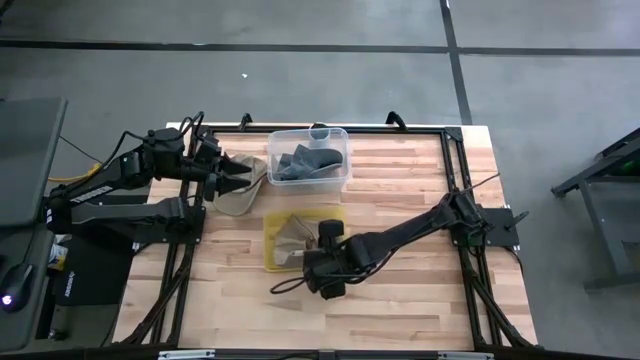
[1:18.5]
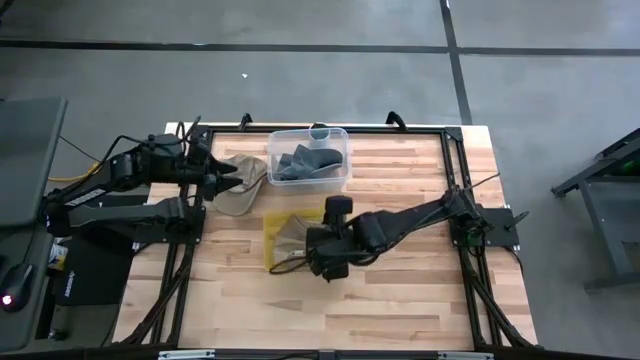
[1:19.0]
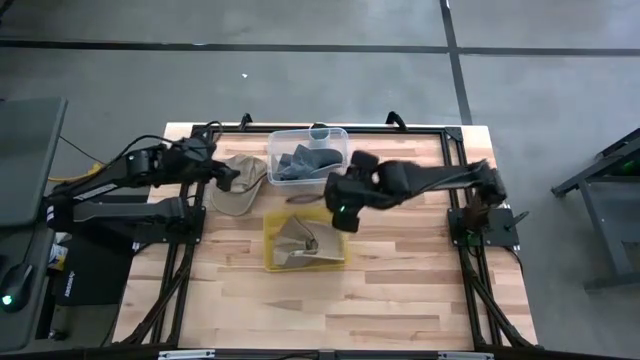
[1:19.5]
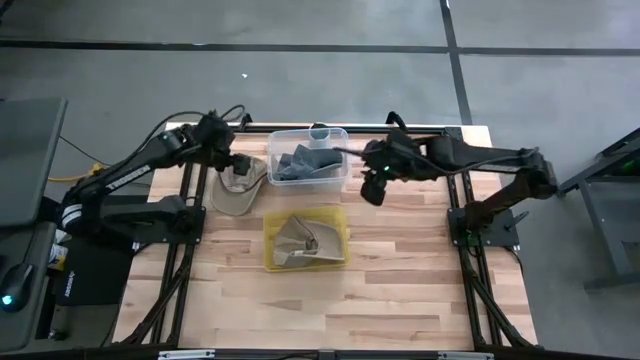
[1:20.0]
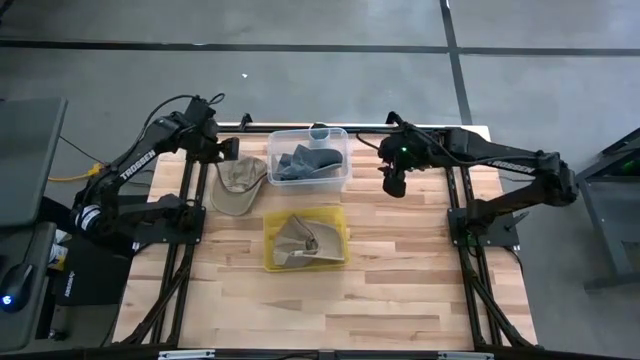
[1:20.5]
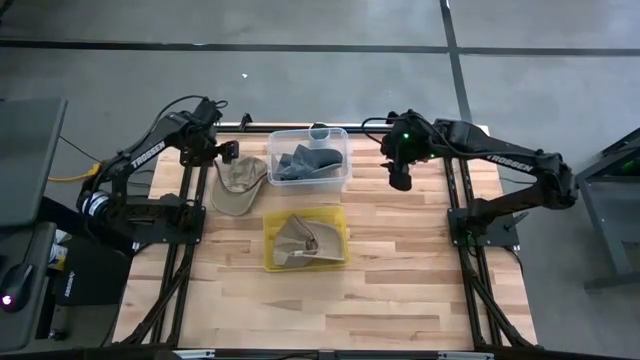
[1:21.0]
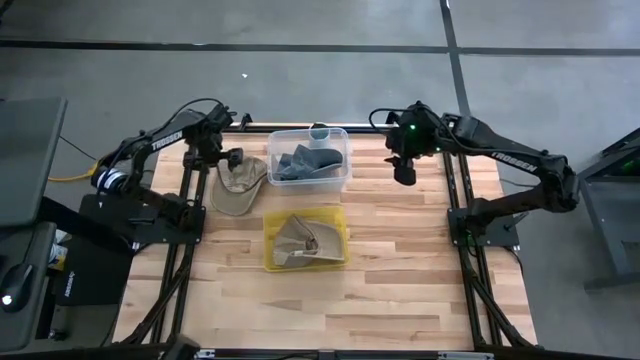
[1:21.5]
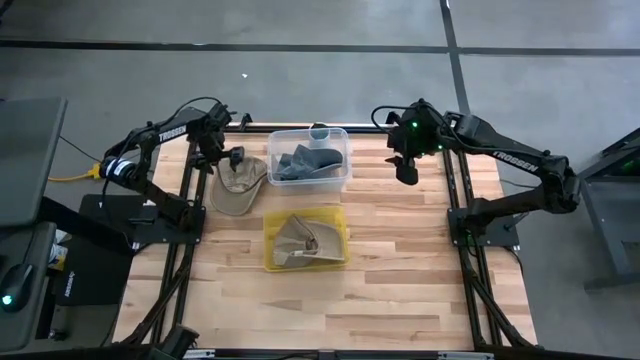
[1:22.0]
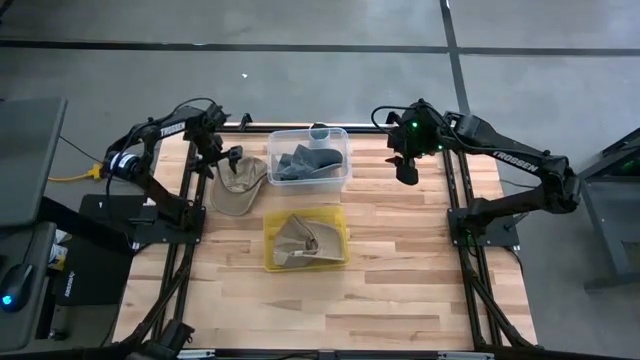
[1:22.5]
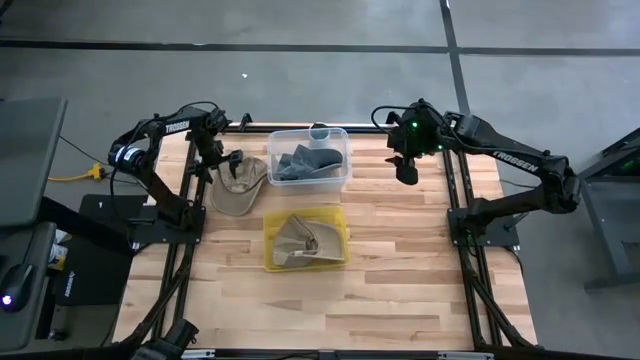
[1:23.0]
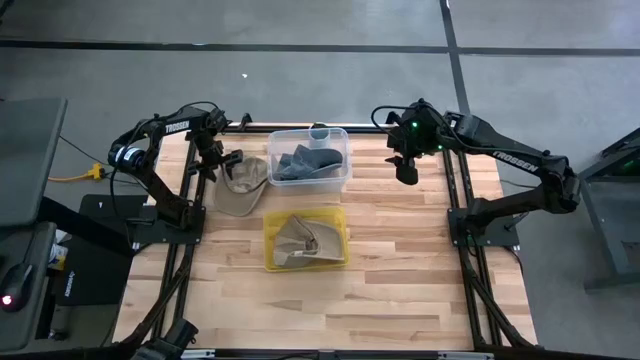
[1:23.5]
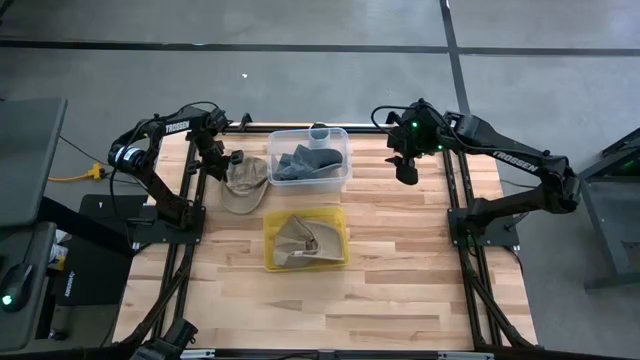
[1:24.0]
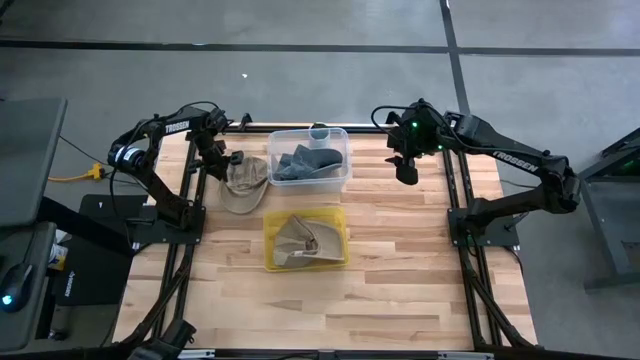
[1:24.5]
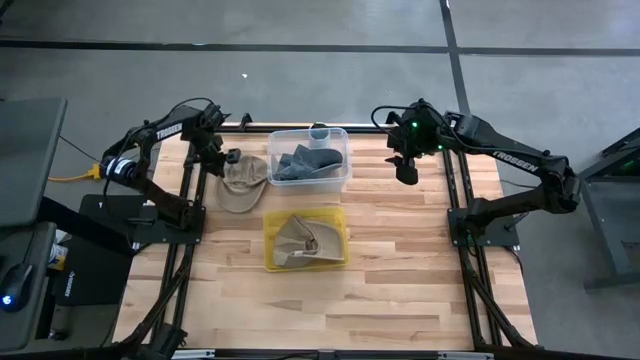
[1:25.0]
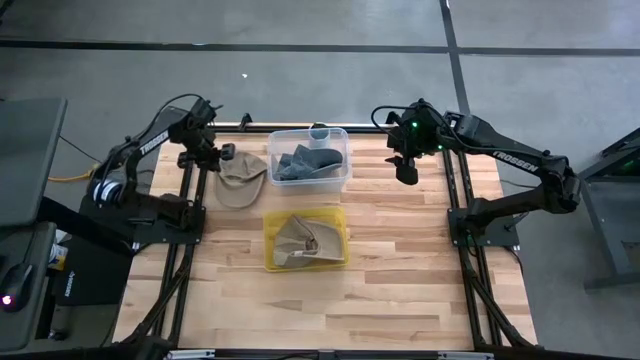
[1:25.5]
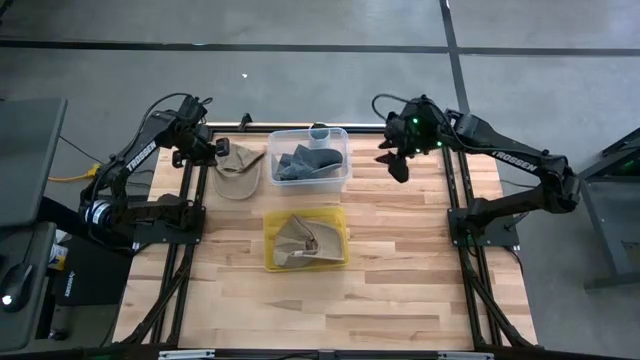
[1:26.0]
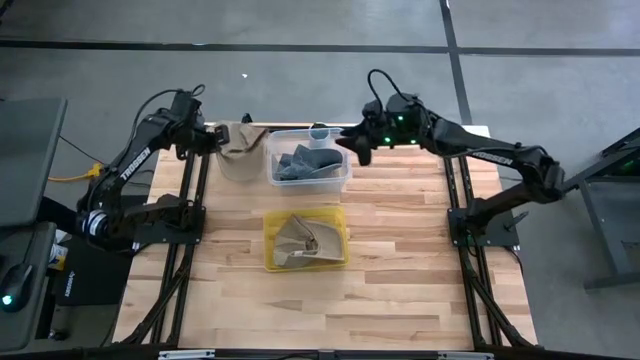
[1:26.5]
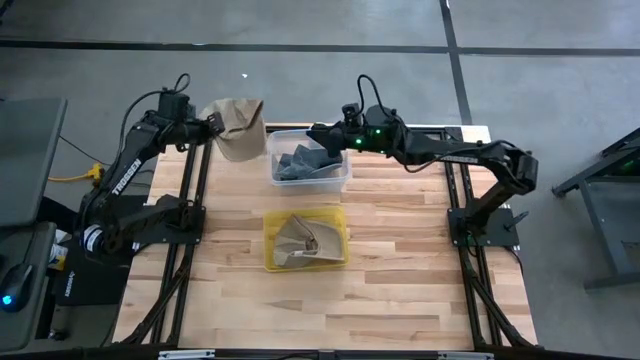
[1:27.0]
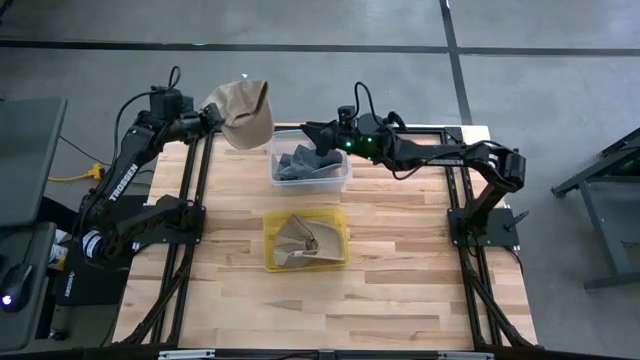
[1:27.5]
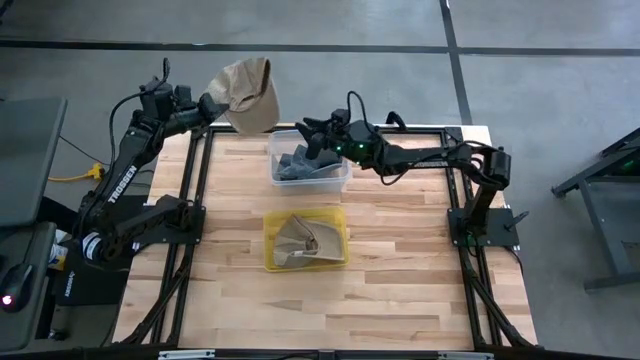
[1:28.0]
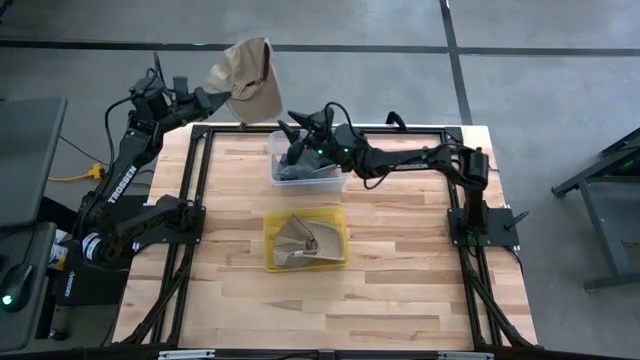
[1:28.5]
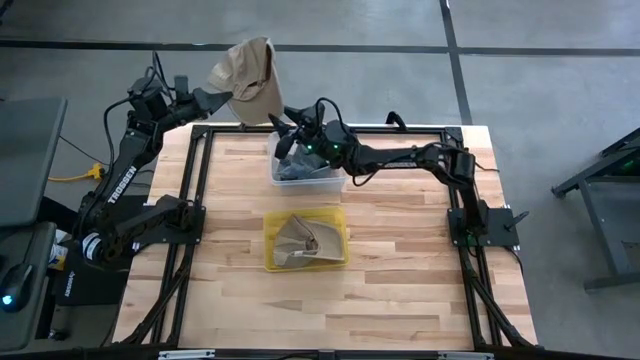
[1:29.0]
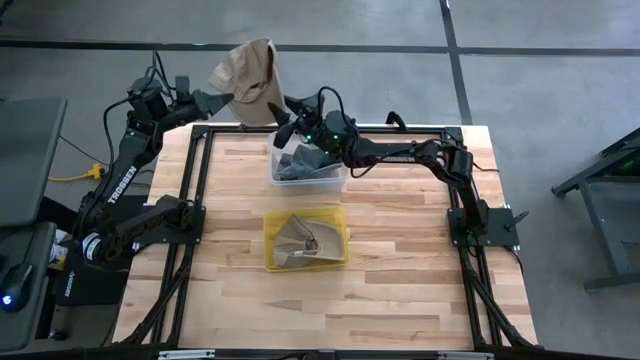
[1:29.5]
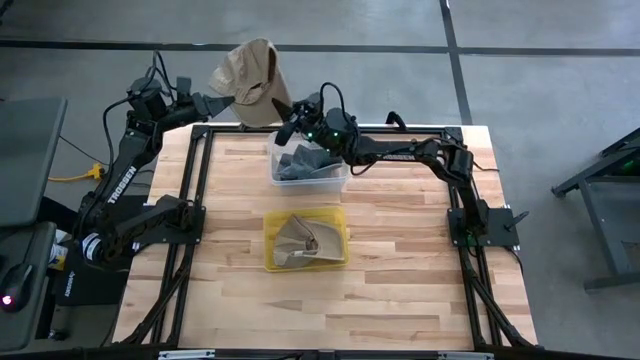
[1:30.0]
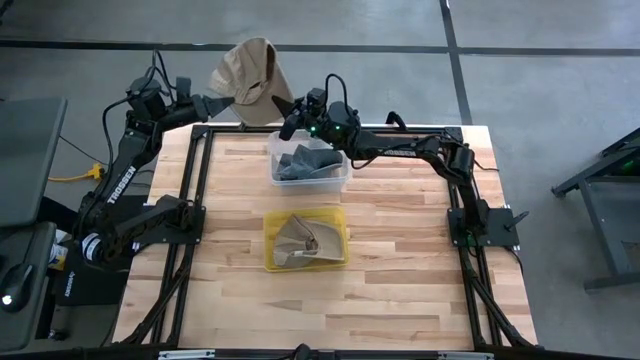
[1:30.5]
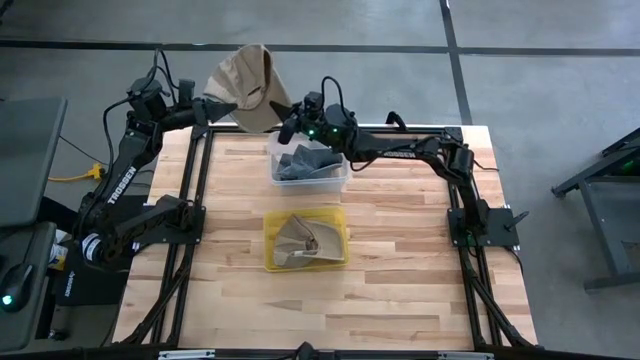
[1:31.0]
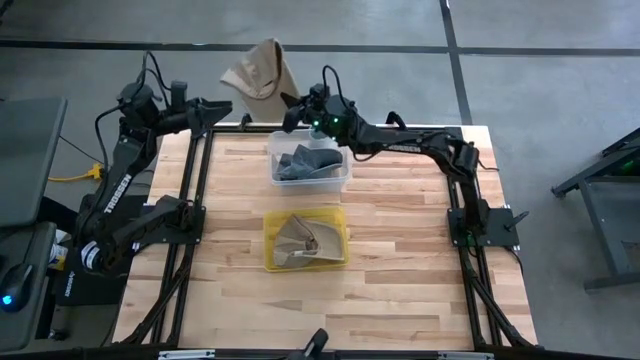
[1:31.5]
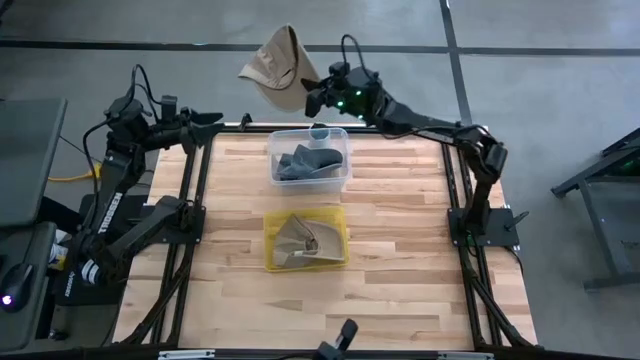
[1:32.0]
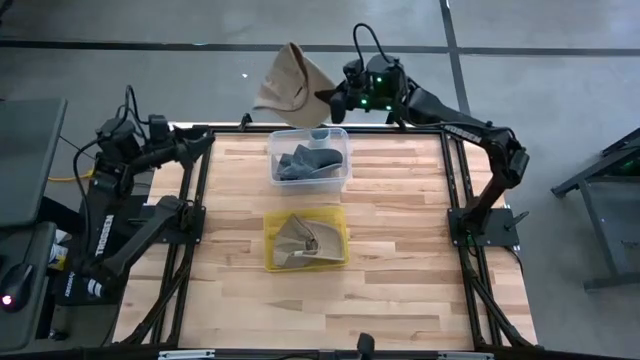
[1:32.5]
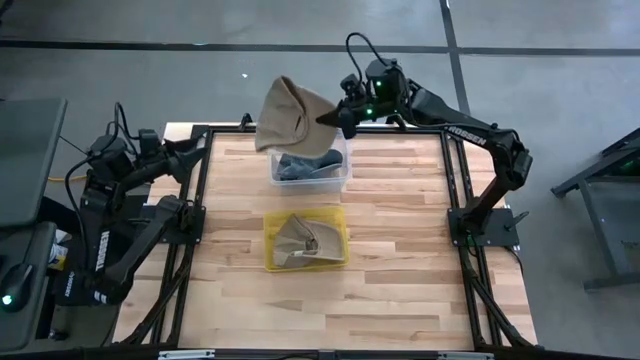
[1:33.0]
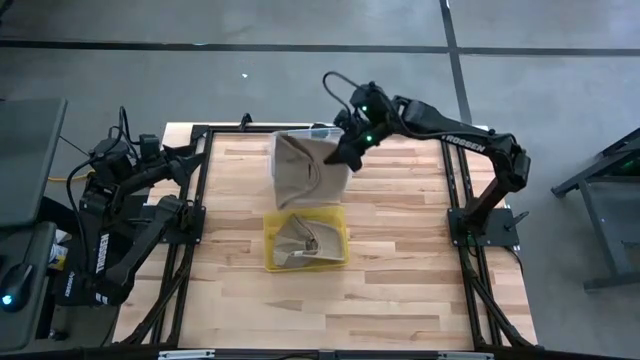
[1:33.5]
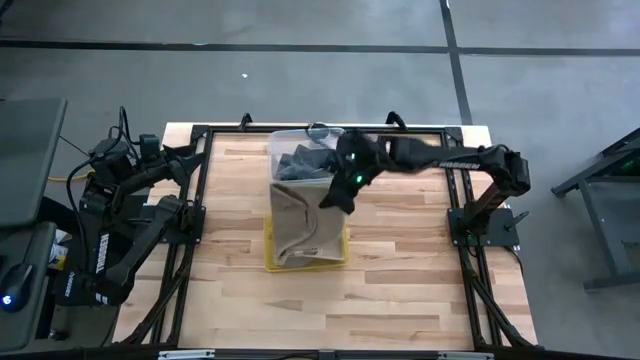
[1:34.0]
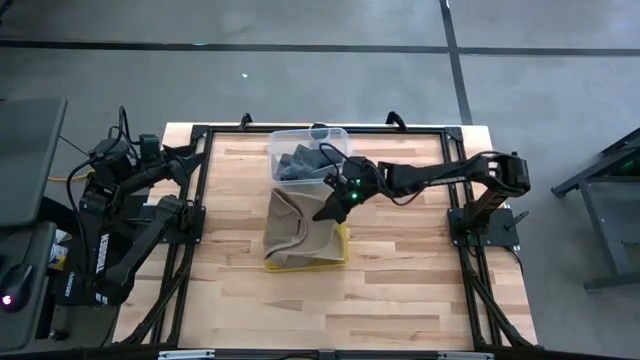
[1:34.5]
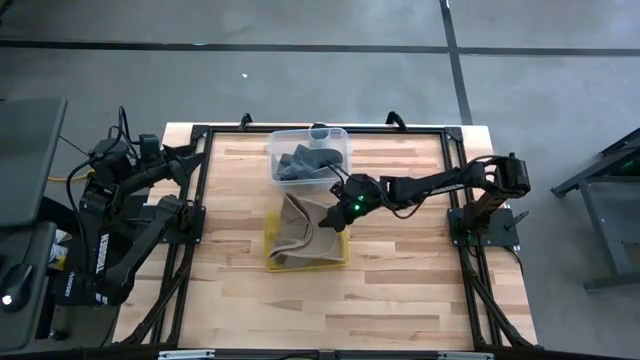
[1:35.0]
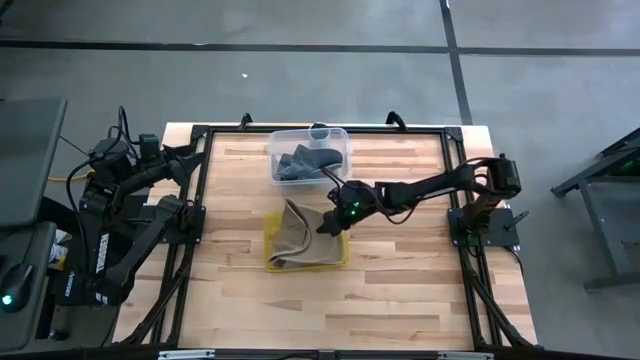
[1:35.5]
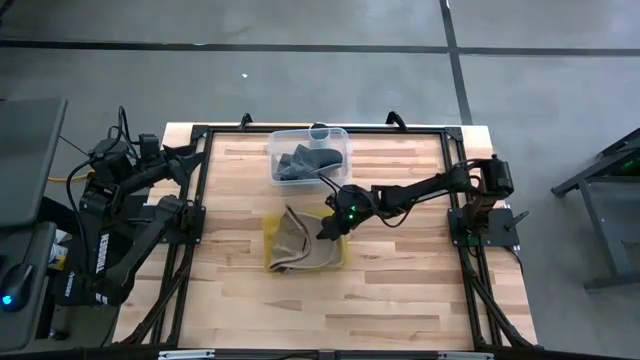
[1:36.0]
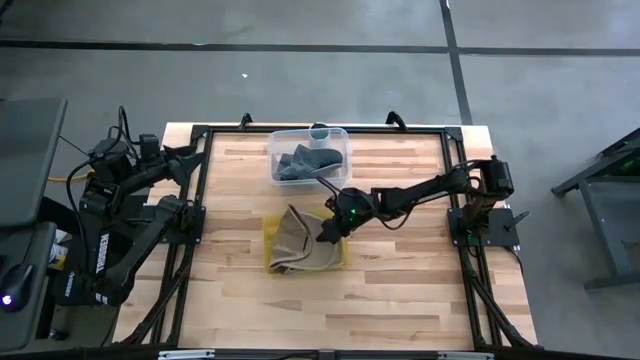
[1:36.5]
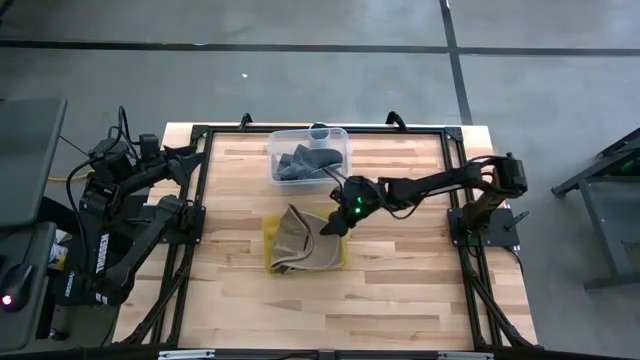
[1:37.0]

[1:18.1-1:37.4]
Task: Pick & Place hat
Put the brown cap into the yellow bin

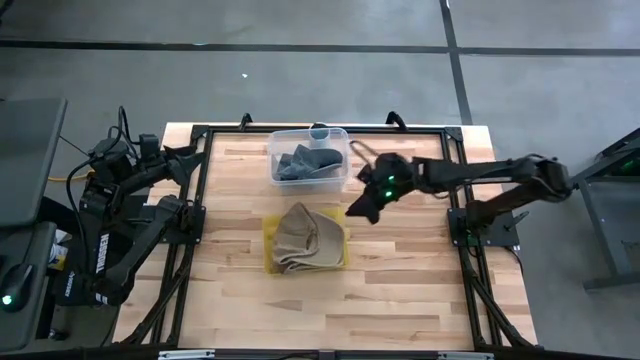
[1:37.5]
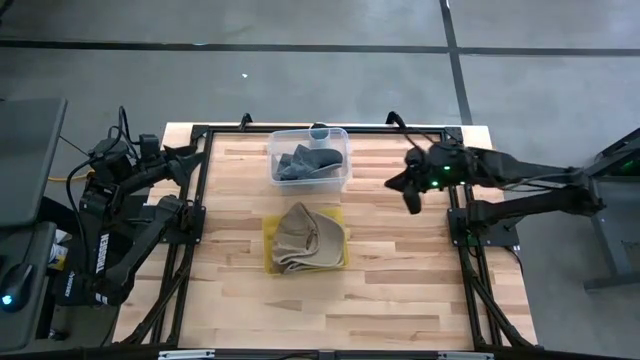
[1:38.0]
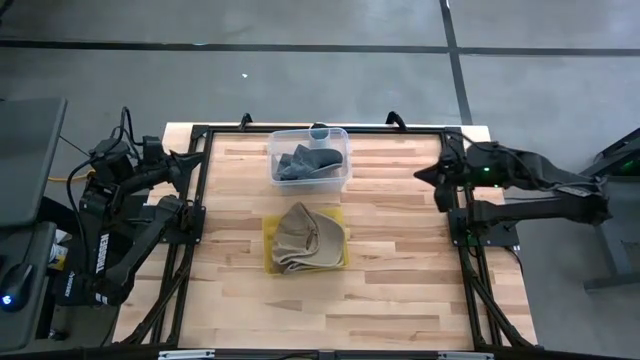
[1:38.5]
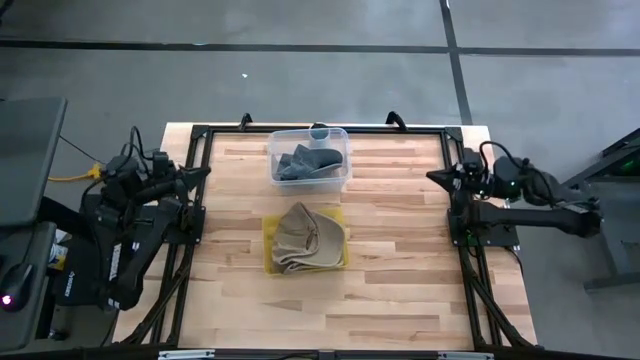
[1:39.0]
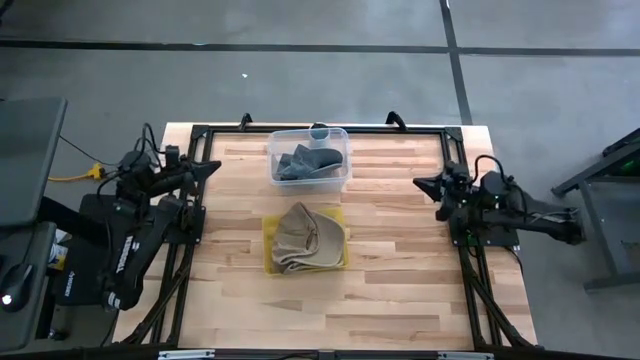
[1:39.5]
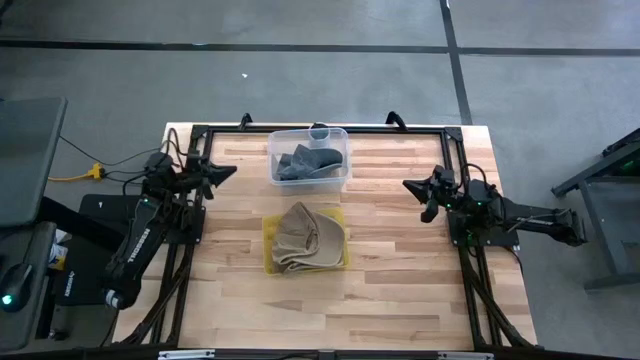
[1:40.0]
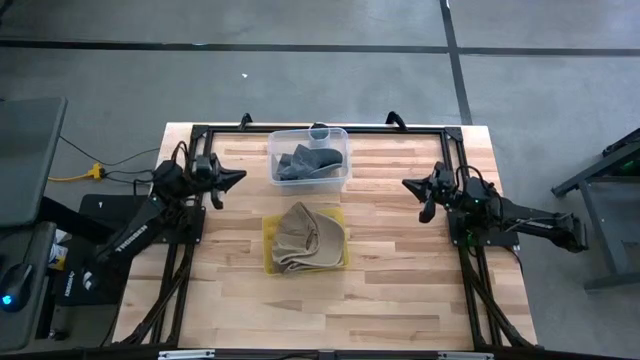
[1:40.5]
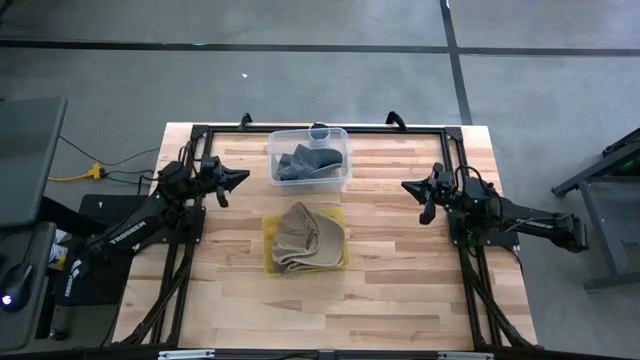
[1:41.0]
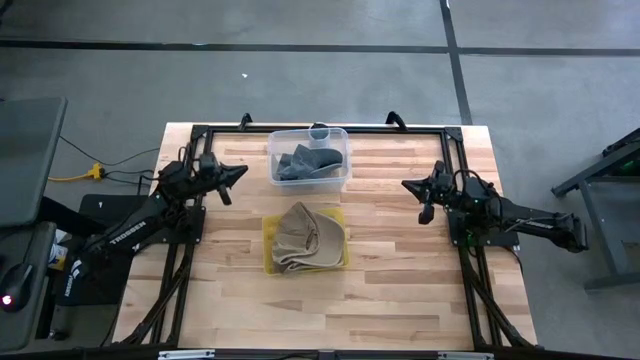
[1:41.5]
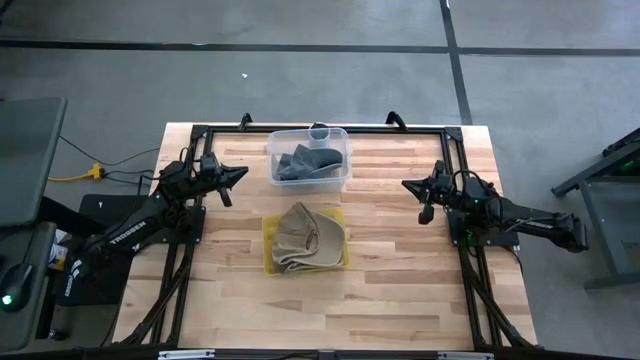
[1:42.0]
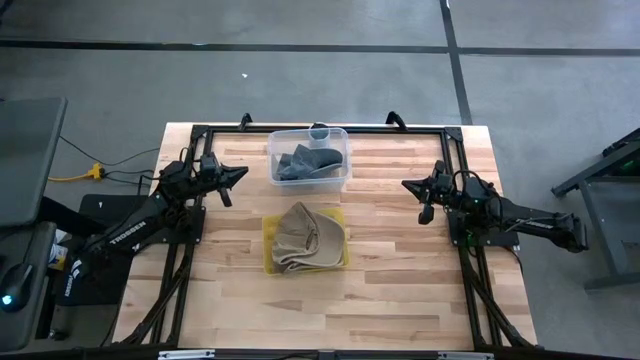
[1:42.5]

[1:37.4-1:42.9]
Return to Home Position
